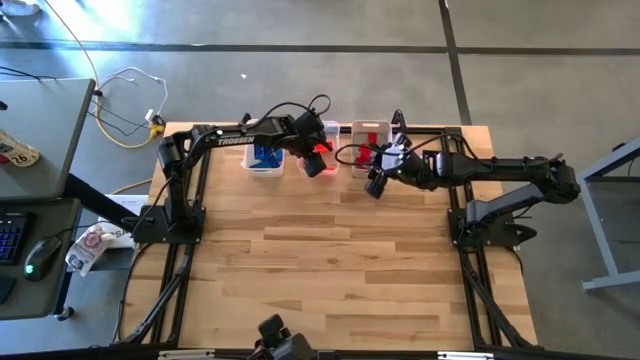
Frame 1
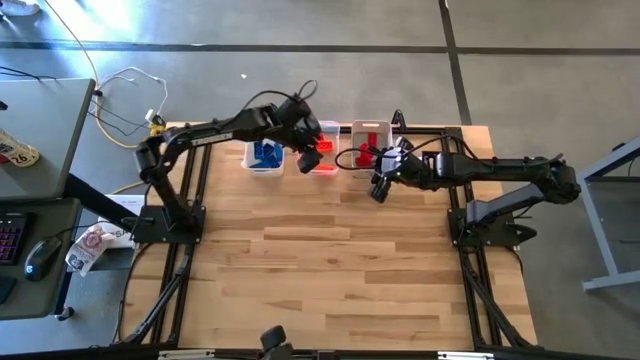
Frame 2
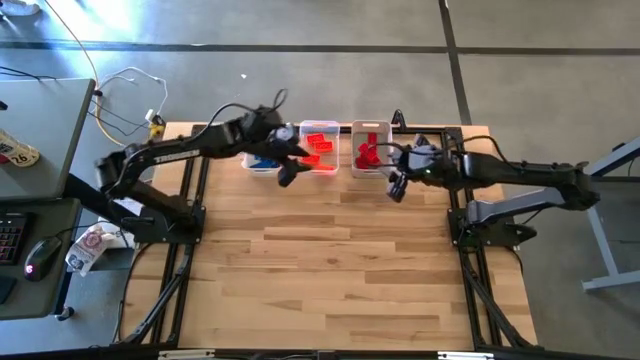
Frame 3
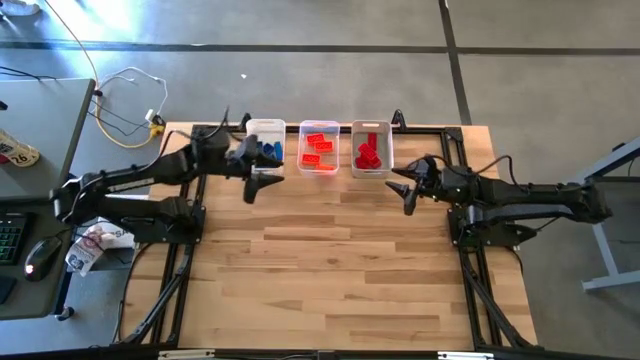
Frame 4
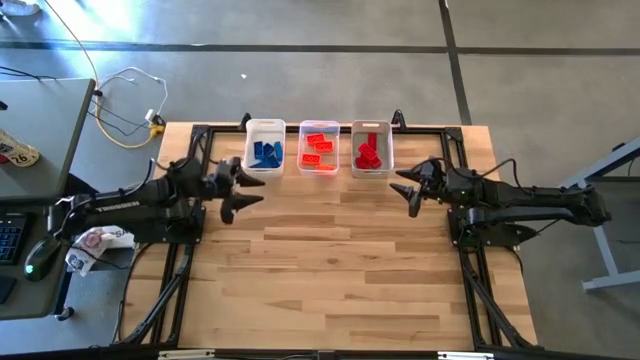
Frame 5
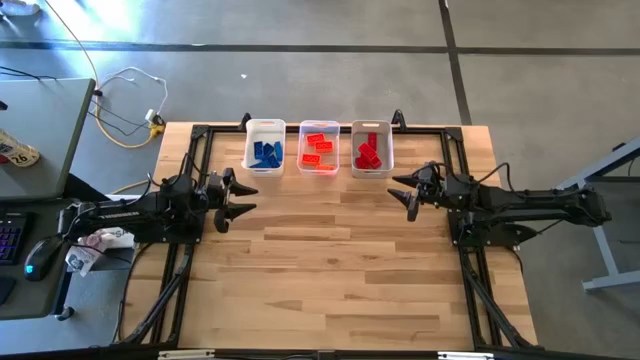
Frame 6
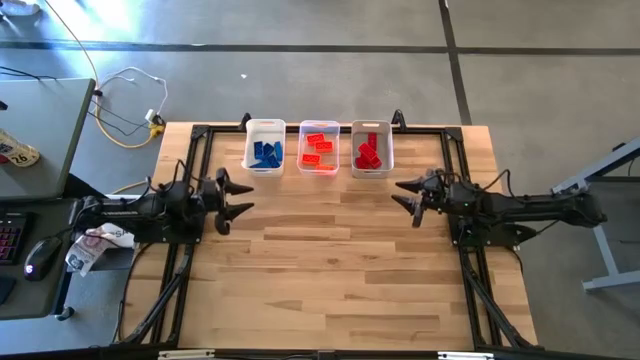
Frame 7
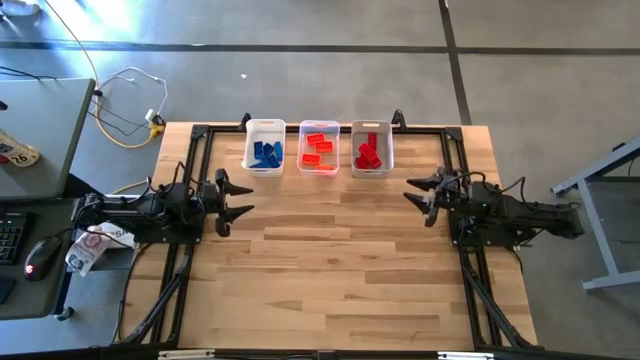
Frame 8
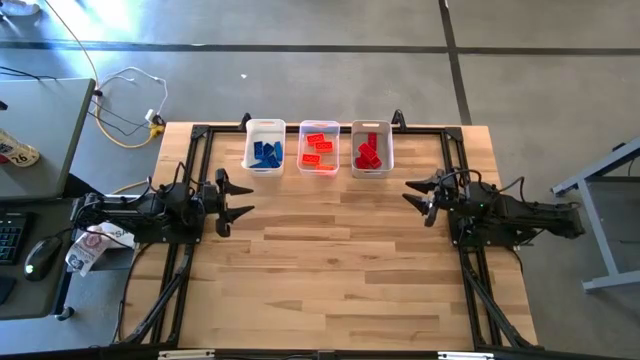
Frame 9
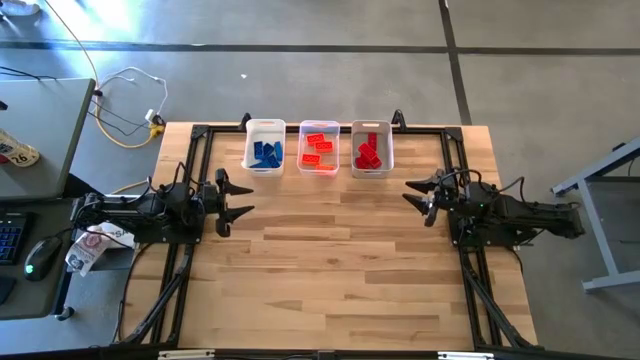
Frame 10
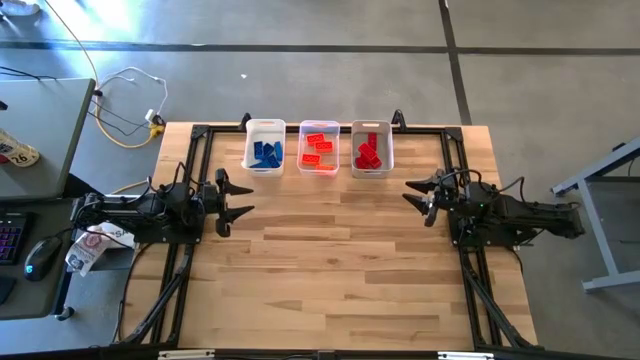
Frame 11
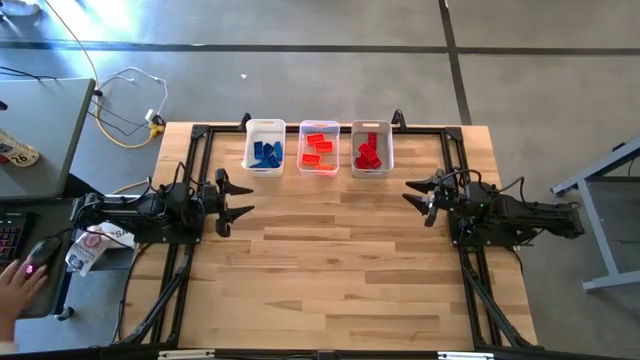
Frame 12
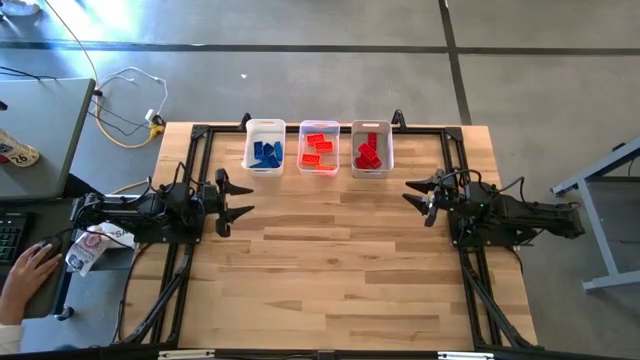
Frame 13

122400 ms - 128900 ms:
Task: Sort & place blocks by color
Return to Home Position

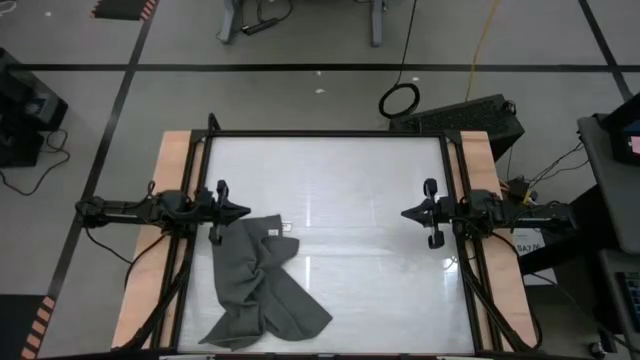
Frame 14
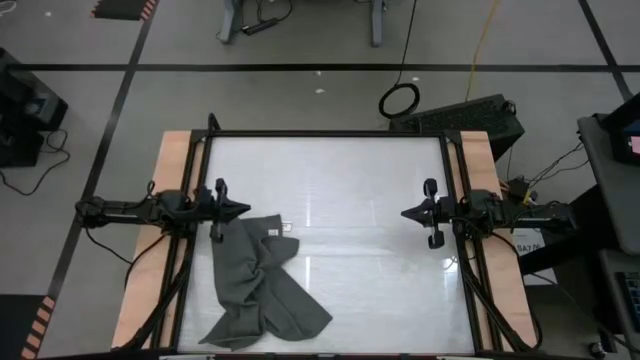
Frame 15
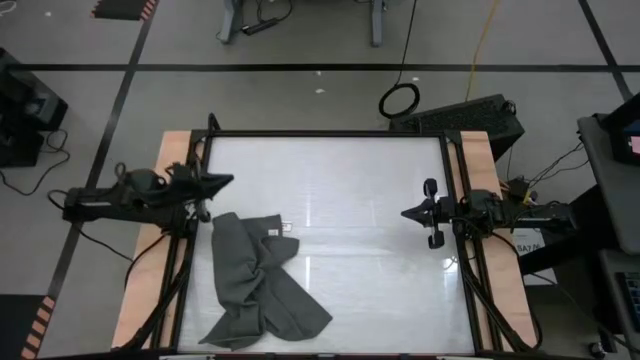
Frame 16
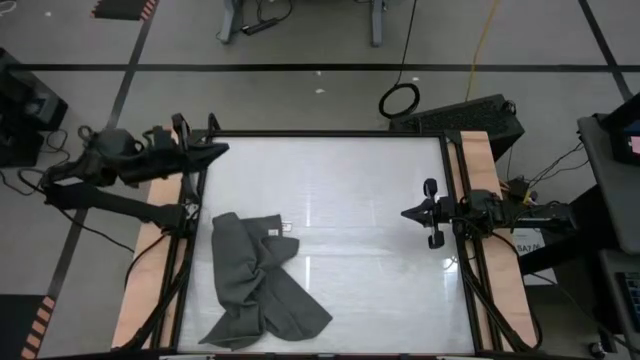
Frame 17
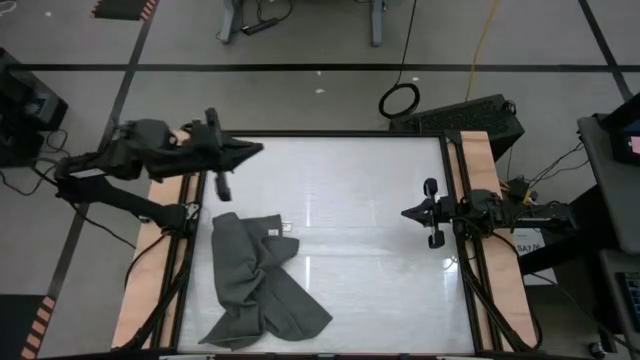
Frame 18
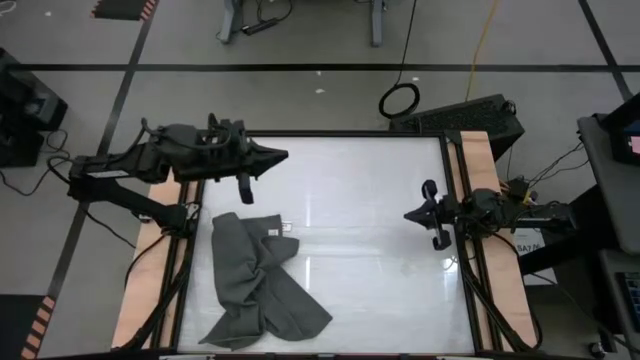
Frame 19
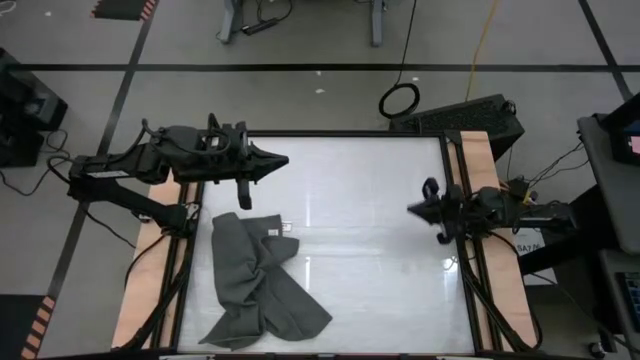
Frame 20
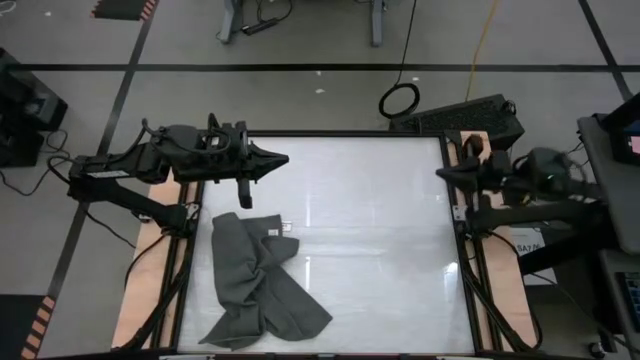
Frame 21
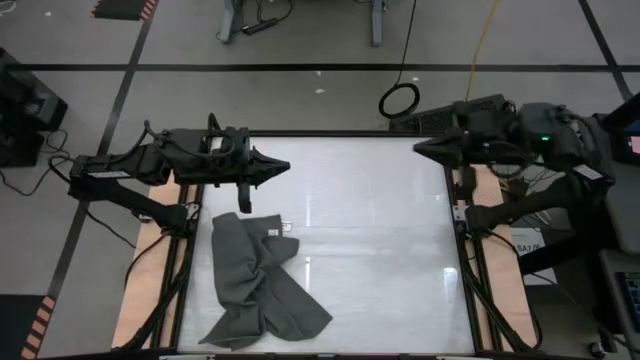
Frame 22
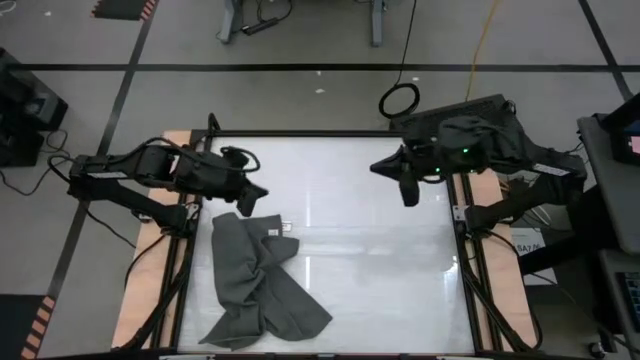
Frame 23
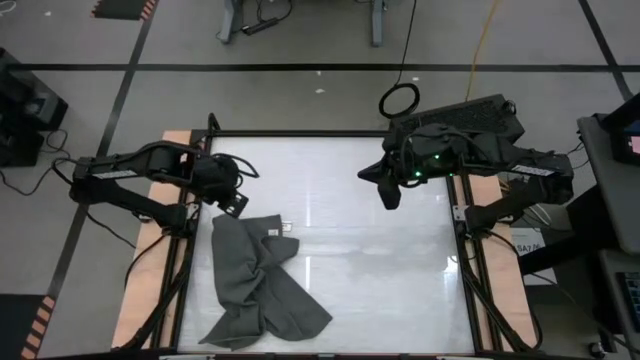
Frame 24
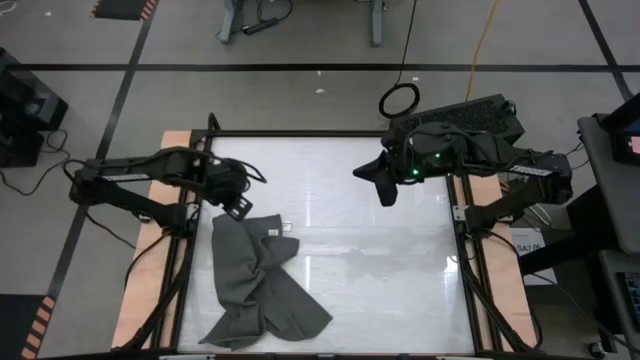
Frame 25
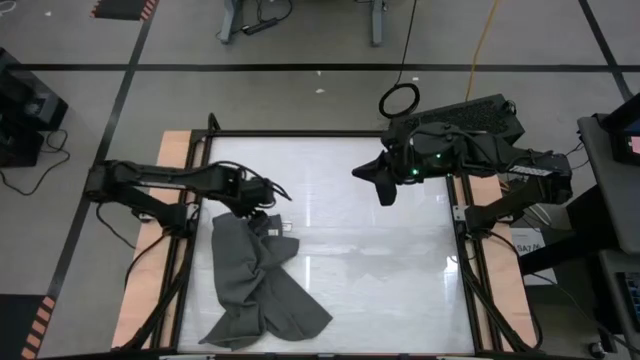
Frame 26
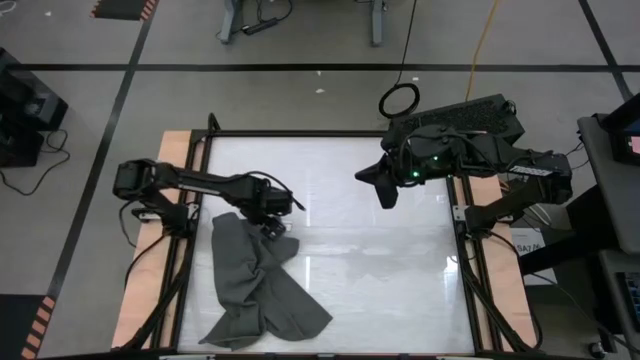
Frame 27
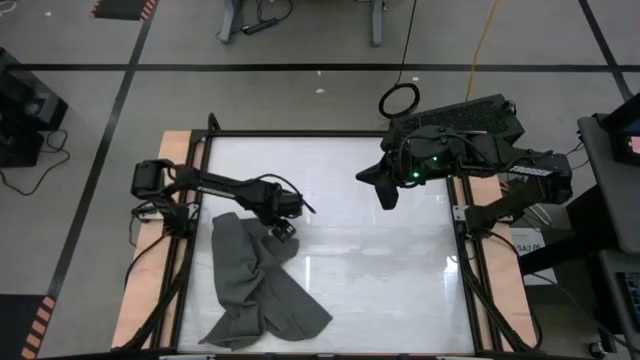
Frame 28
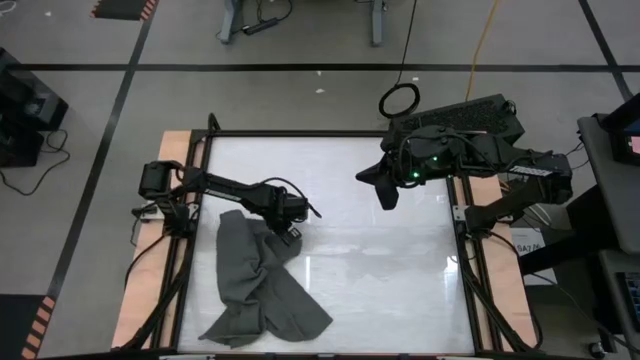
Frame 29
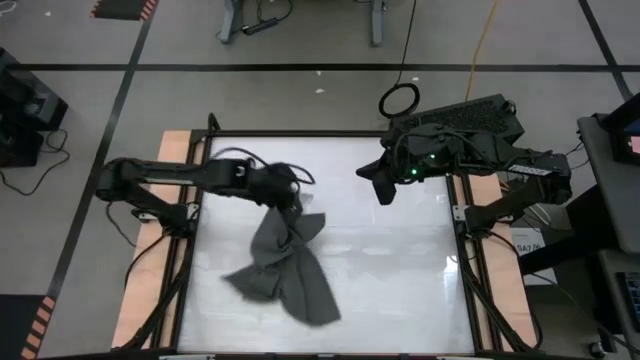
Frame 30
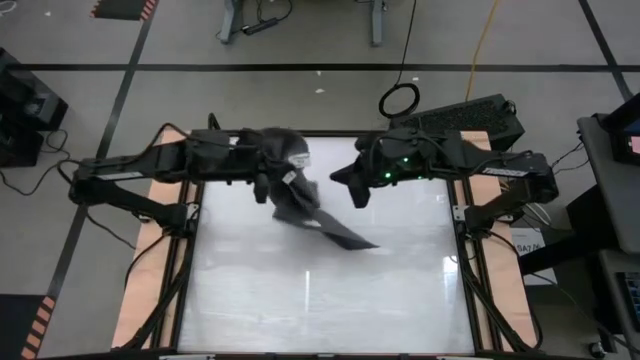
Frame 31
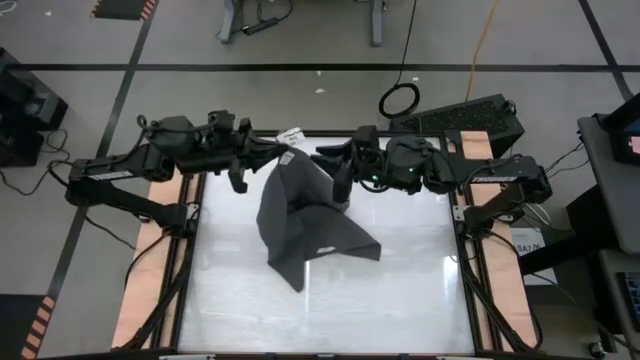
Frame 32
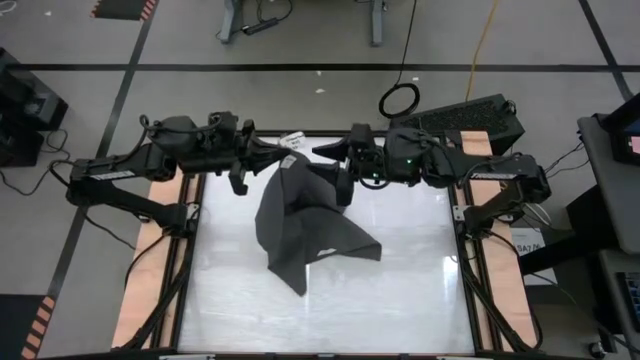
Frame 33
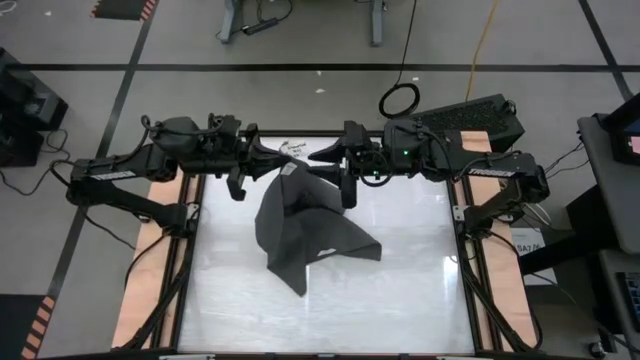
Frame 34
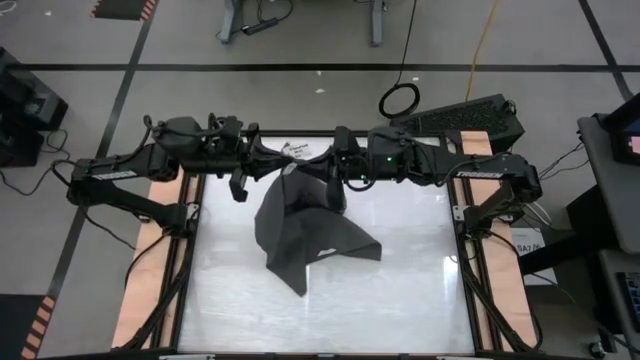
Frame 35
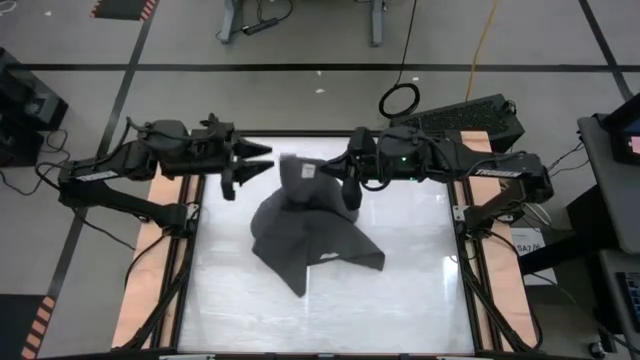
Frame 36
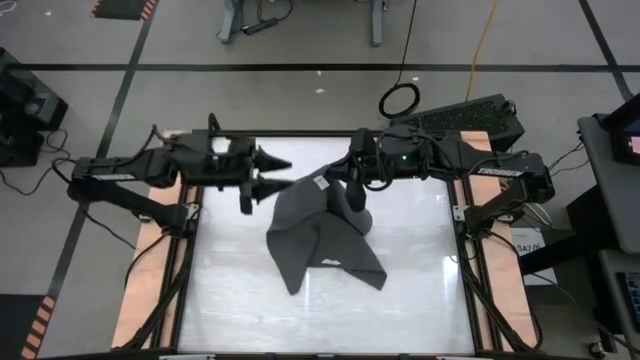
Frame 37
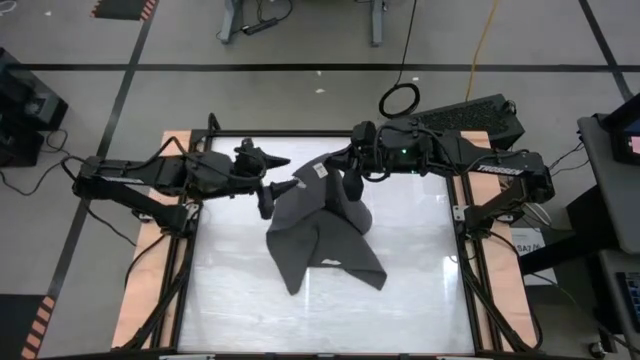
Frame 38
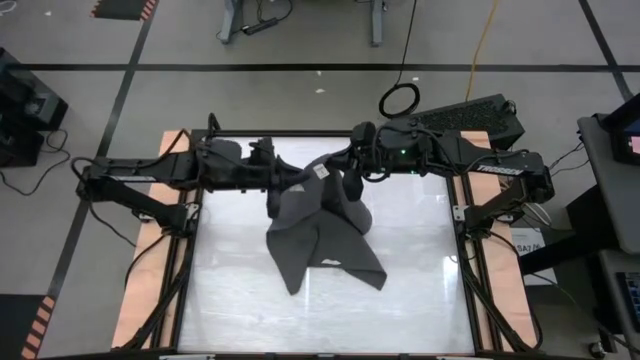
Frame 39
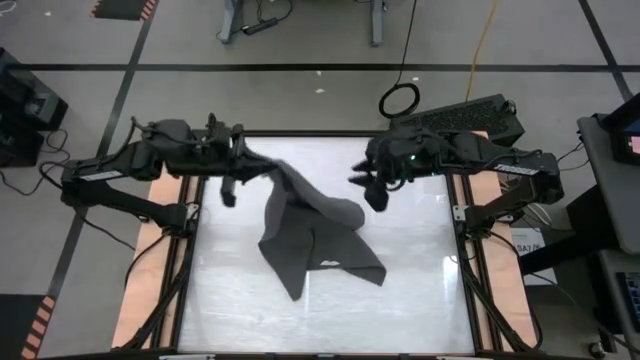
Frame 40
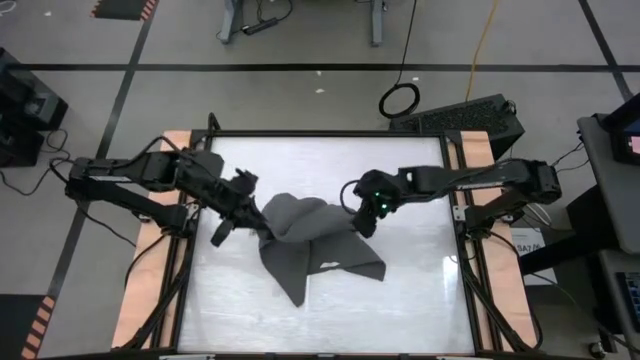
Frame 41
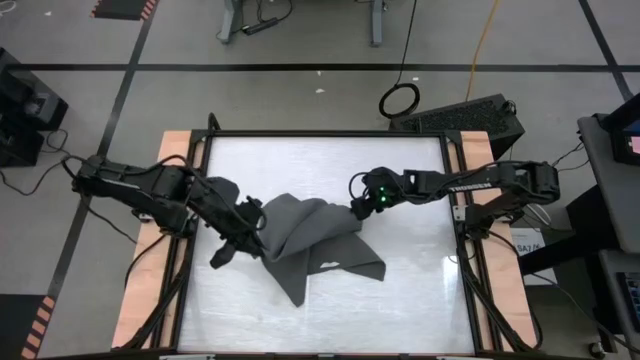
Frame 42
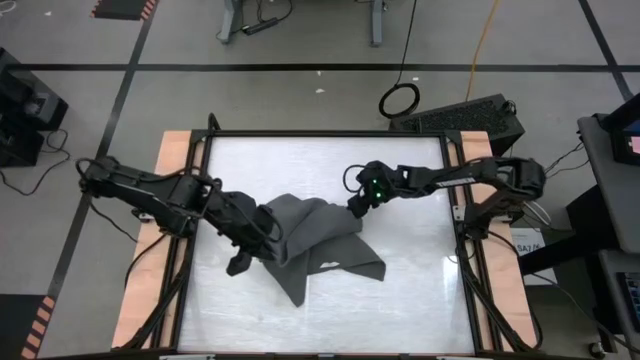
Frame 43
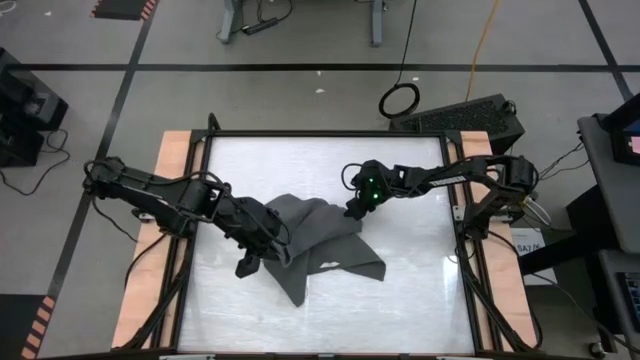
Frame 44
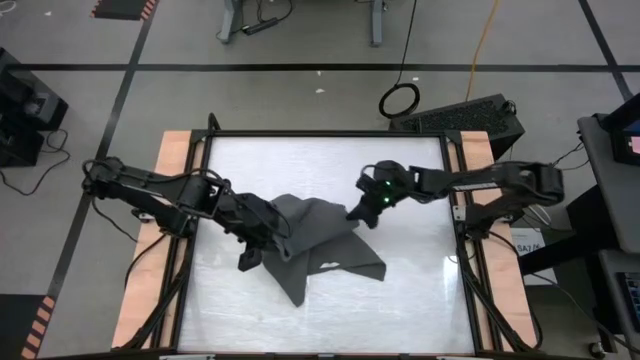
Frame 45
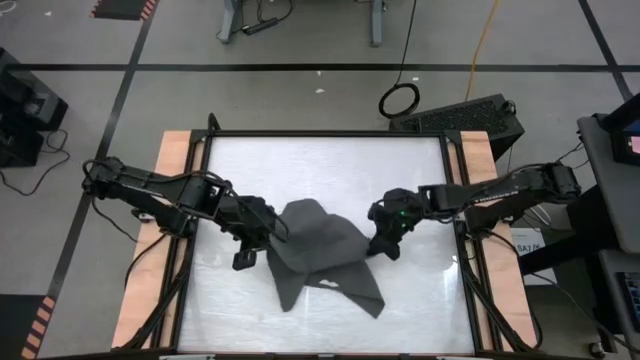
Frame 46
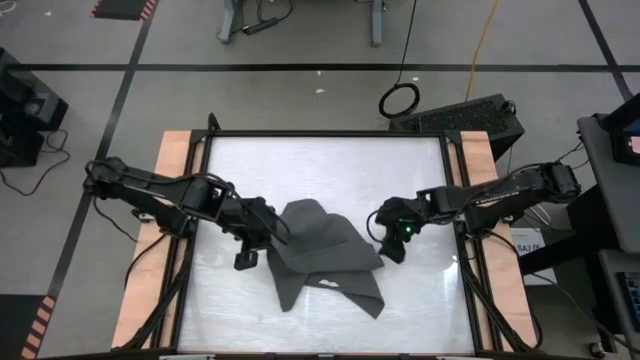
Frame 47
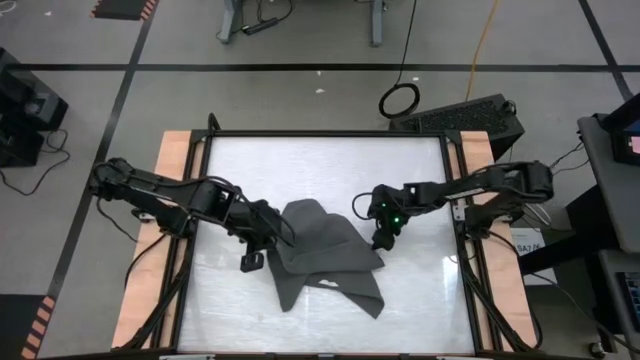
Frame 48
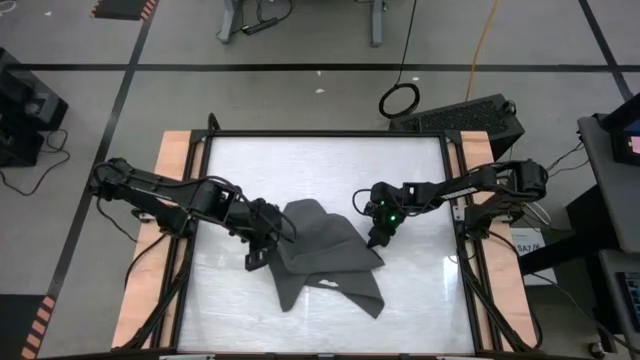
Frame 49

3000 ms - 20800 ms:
Task: Roll towel into tight, uniform cylinder
Roll the gray towel
